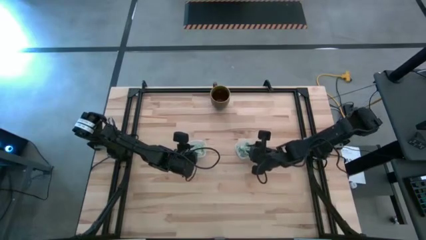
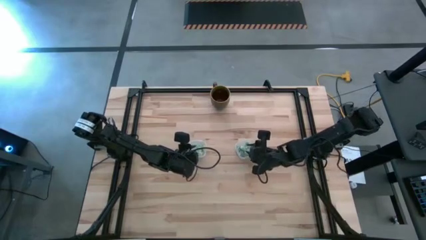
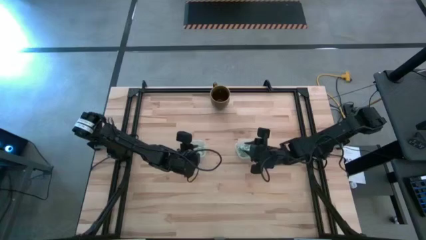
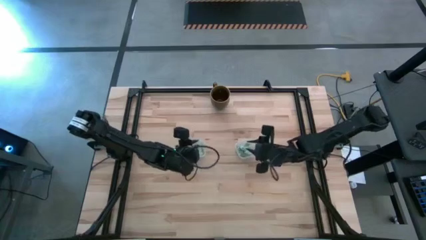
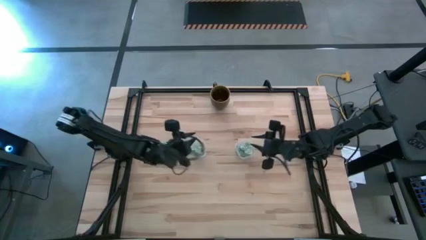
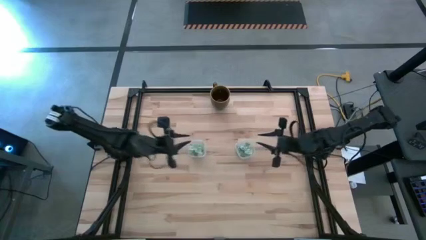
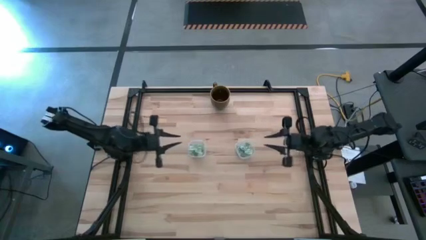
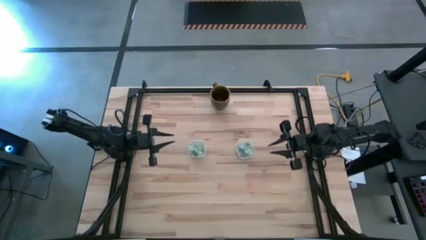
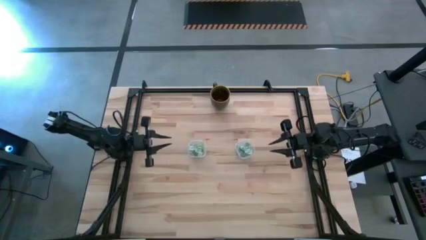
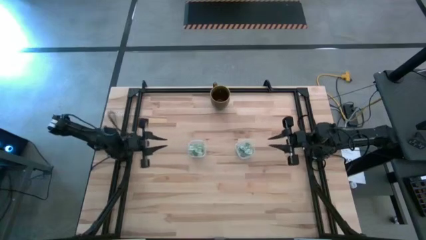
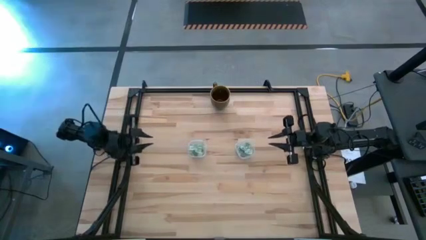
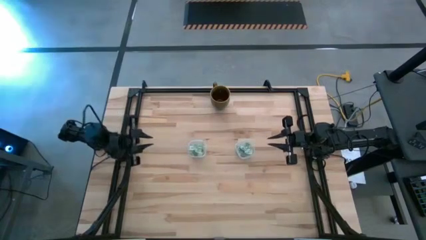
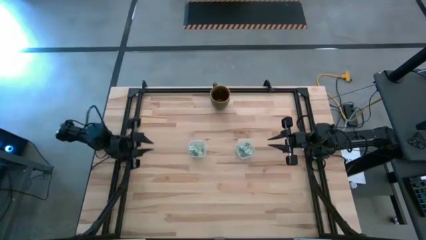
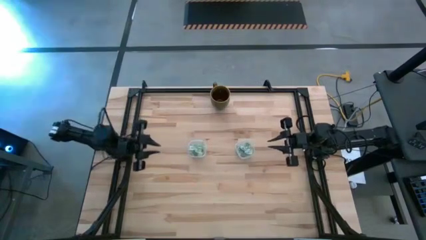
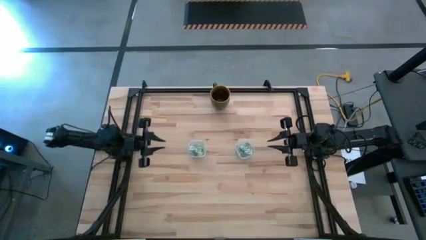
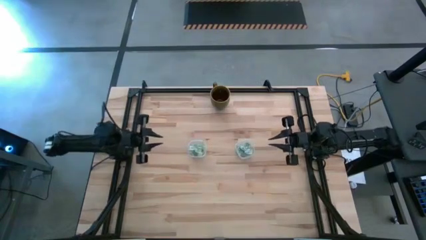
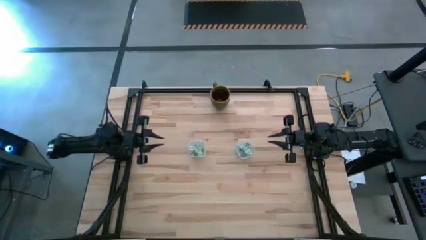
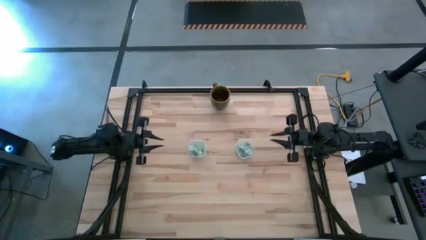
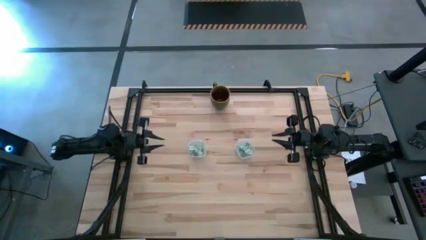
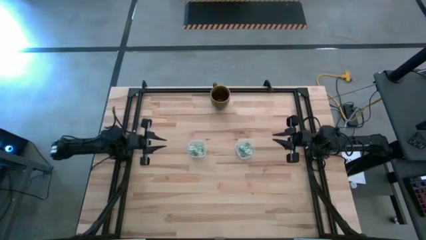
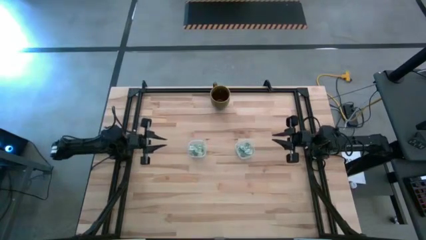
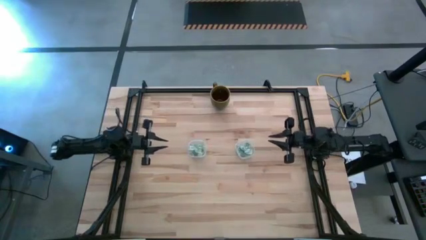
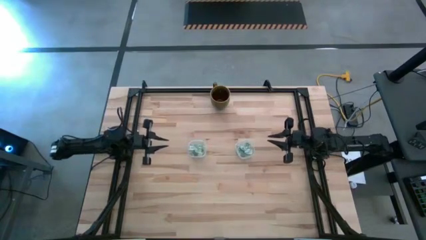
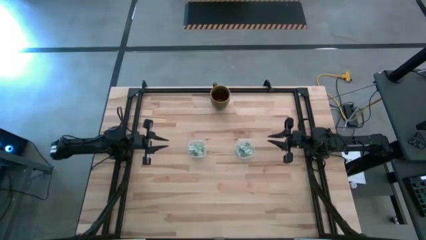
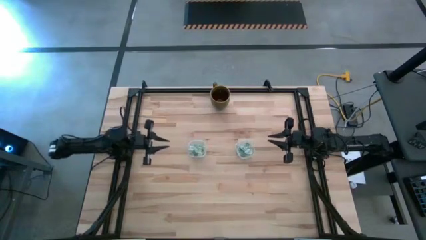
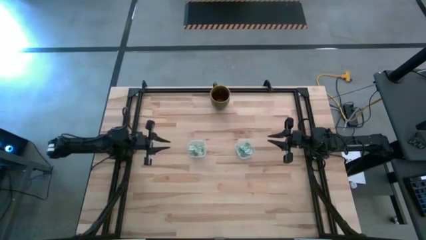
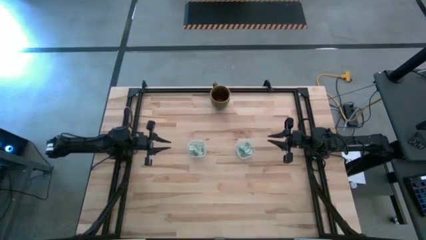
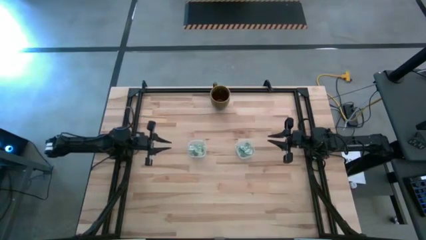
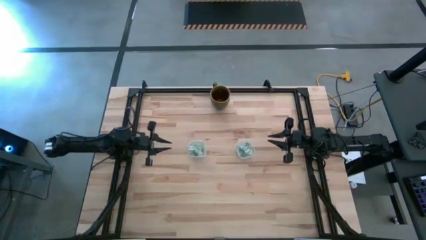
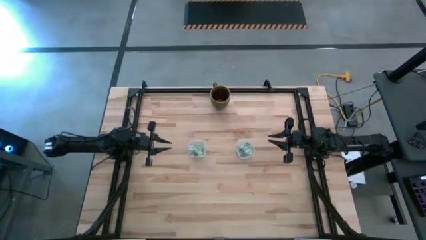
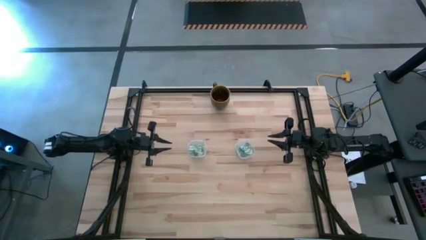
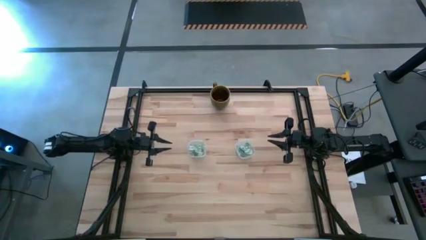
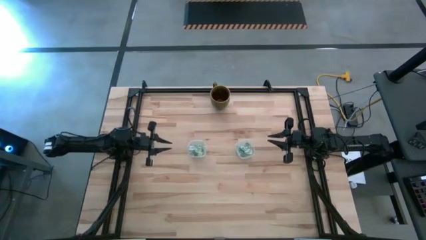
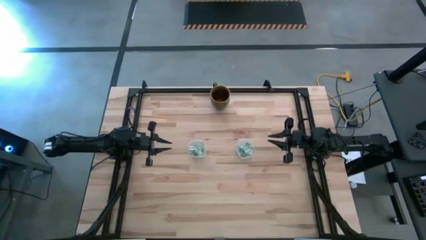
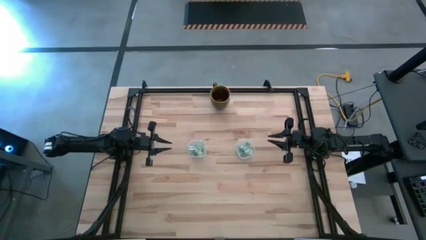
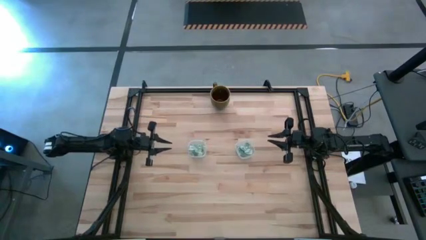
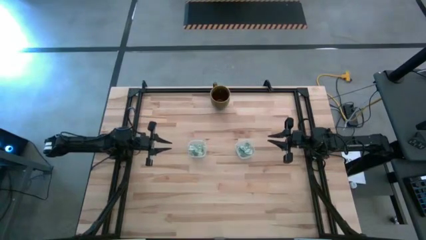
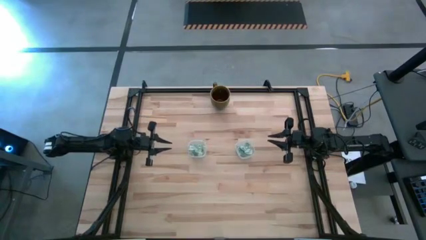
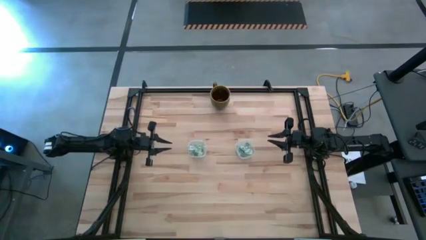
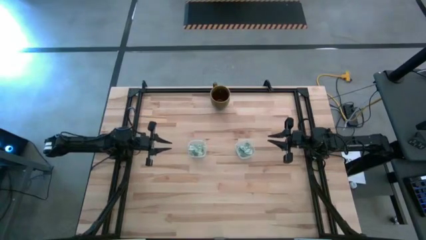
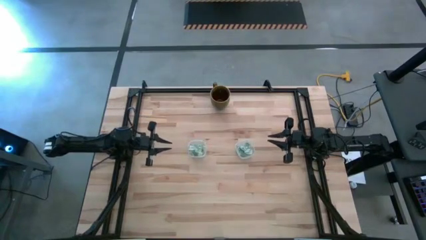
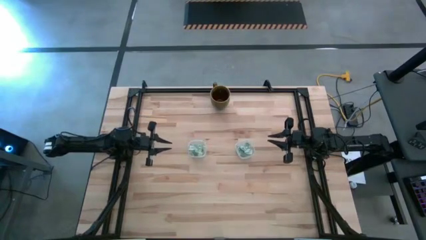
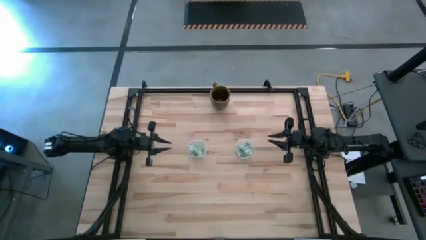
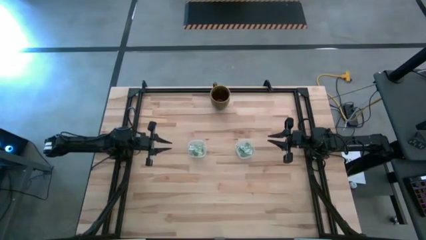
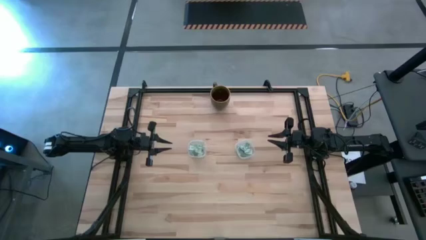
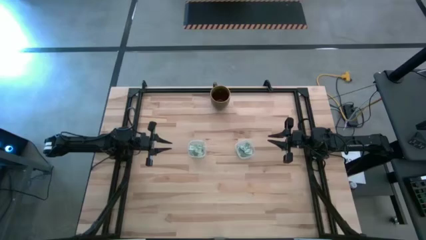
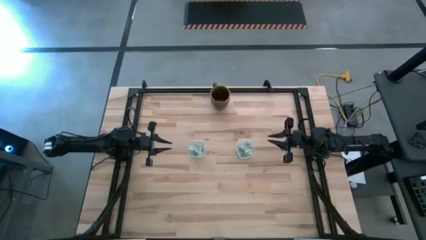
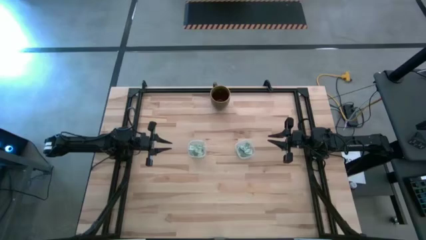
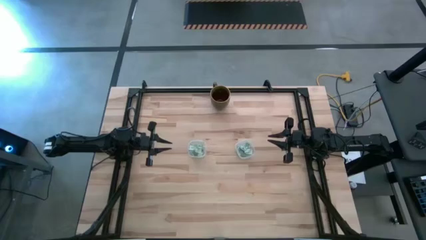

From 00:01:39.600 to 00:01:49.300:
Task: Pick and place Stevia / Truvia into bins
Return to Home Position

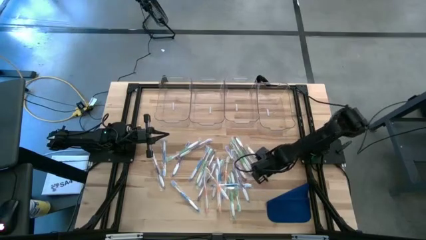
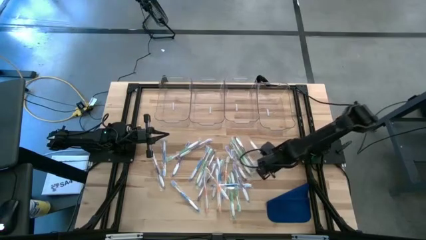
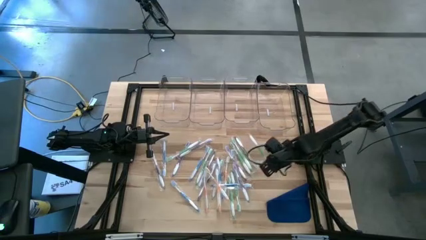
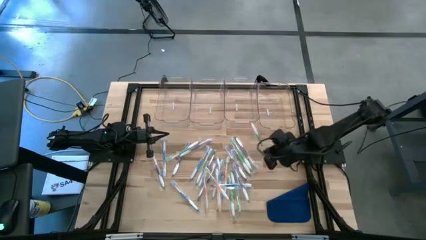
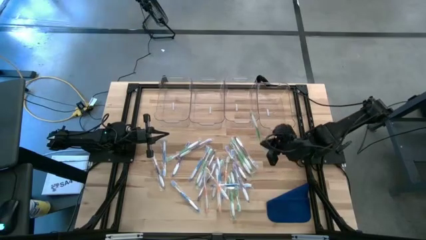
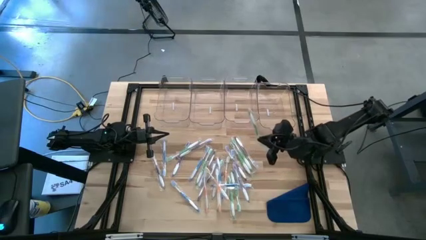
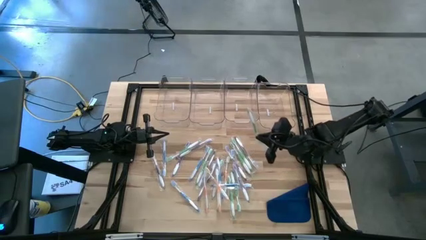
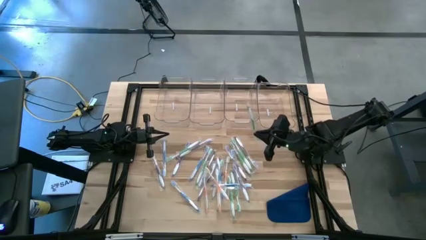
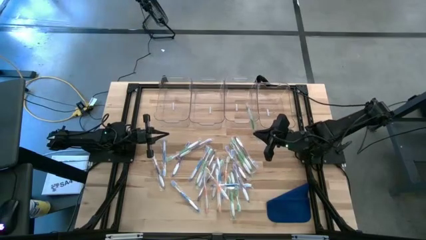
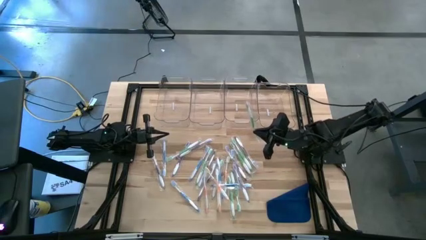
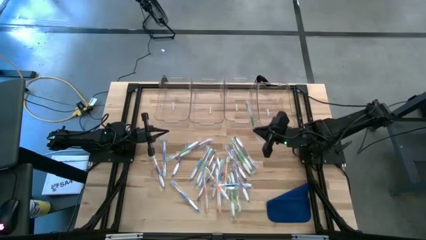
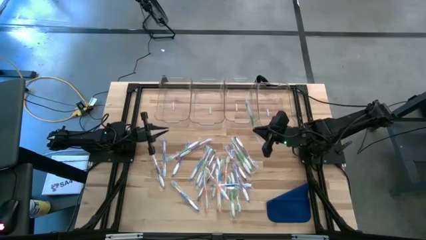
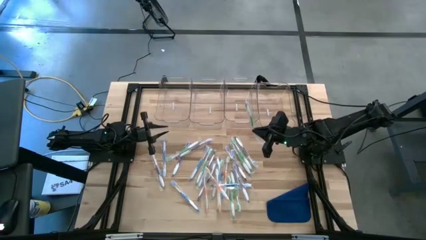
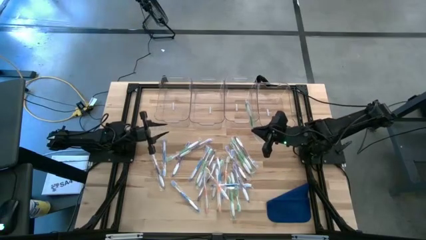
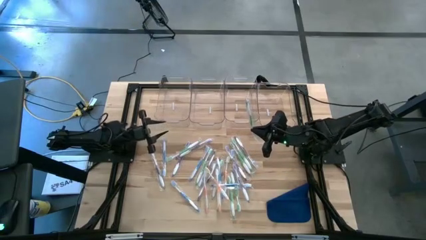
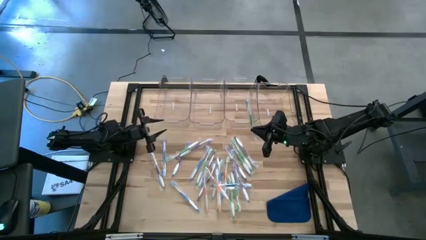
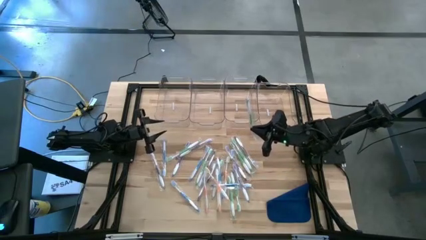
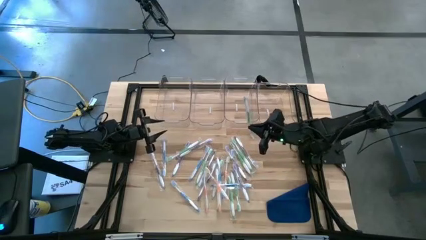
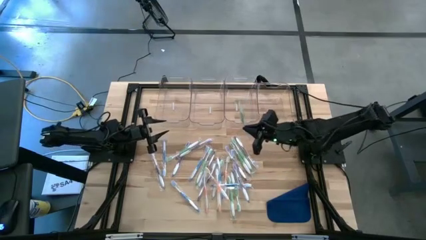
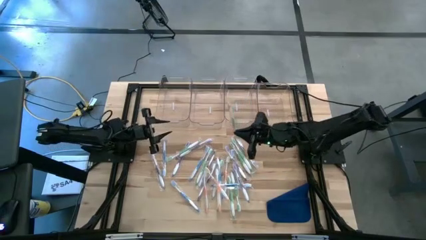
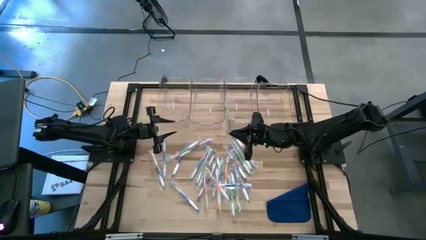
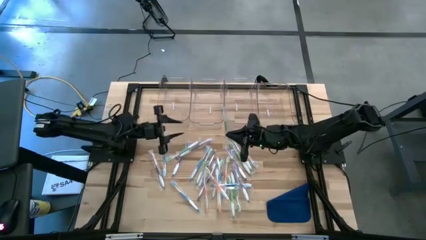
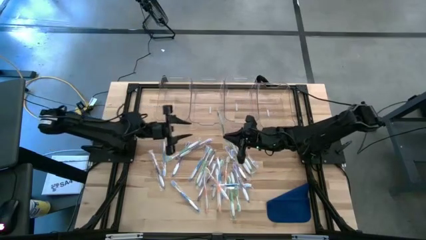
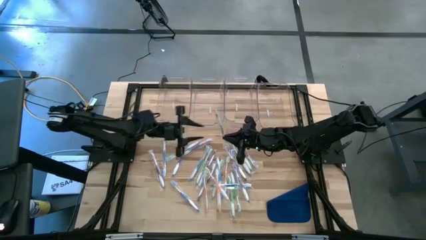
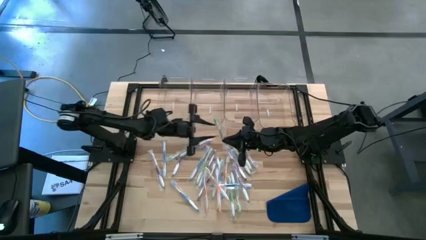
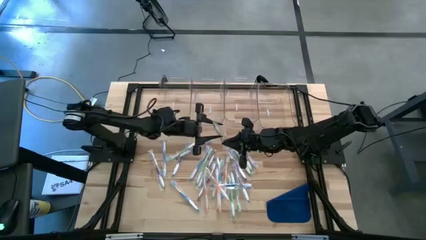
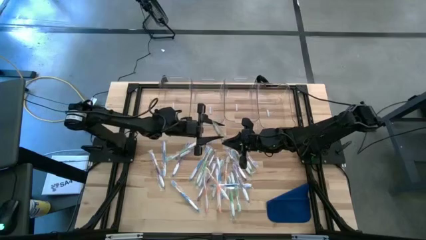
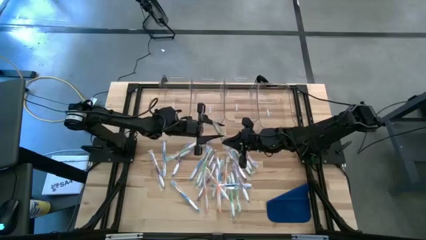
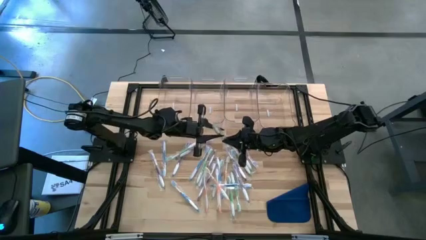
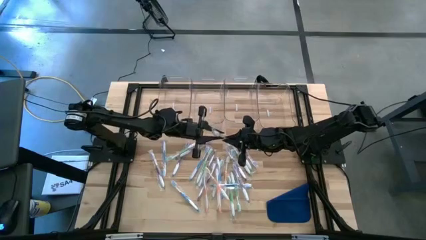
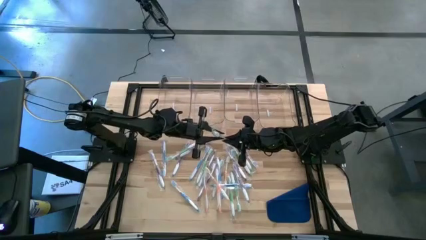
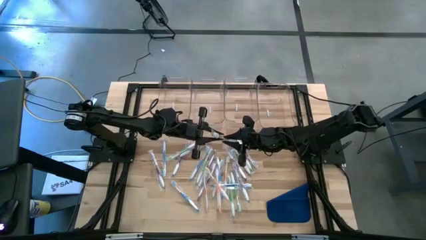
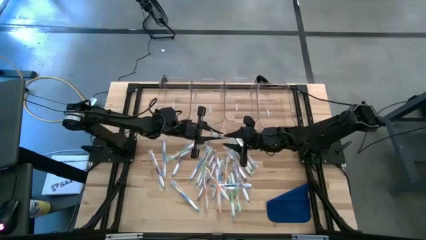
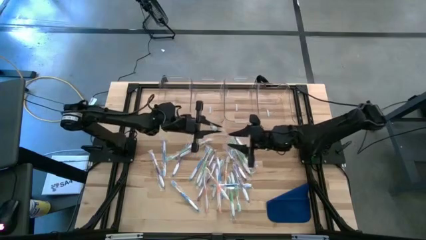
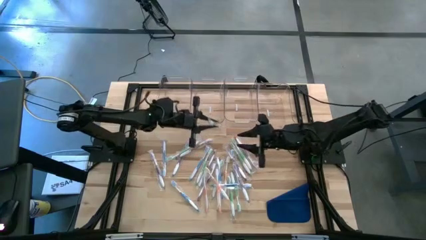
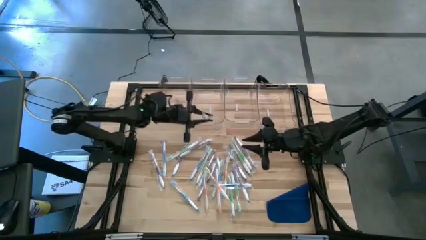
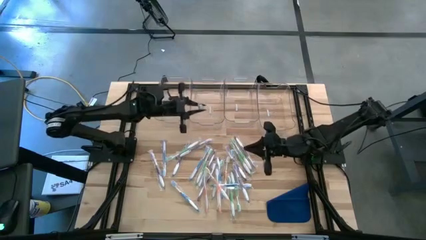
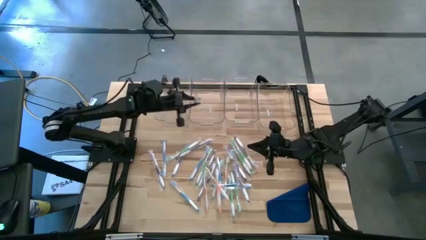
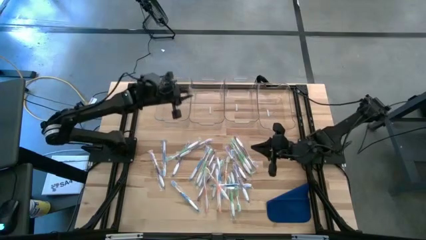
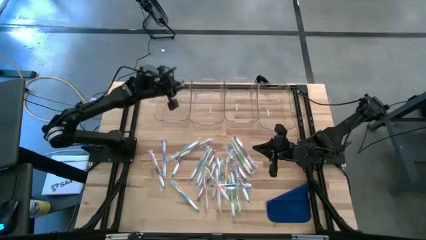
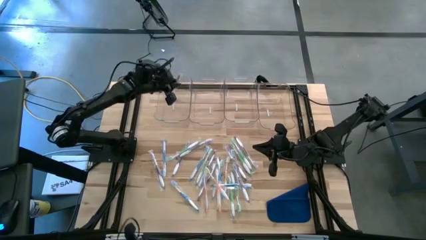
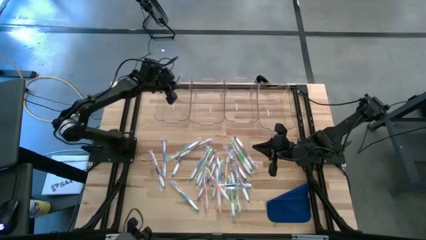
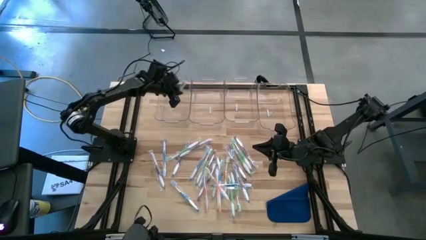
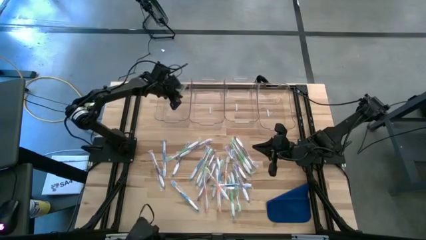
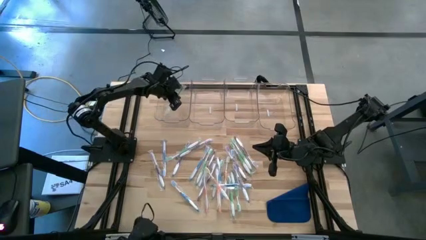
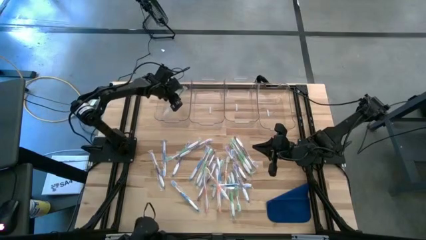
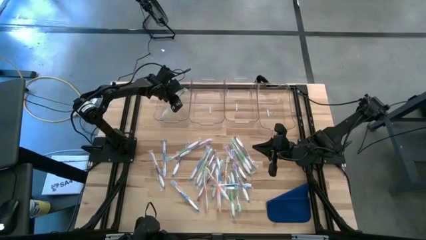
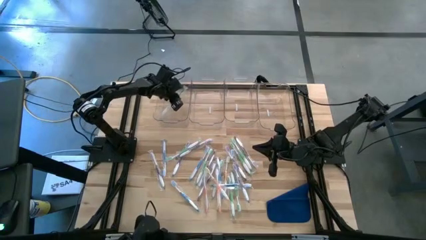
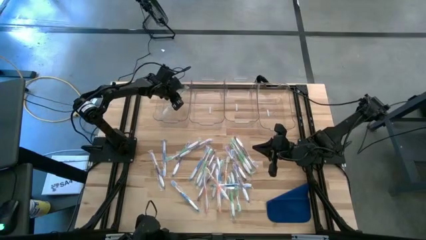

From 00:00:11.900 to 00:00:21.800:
Task: Pick & Place Toothbrushes
Put the green toothbrush into the left transparent bin
